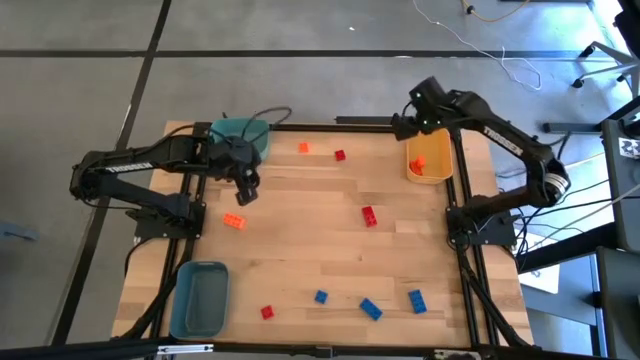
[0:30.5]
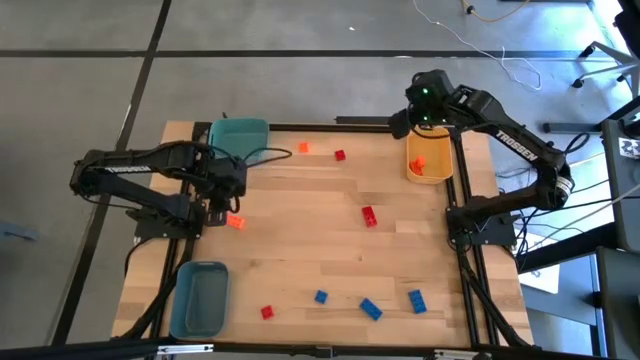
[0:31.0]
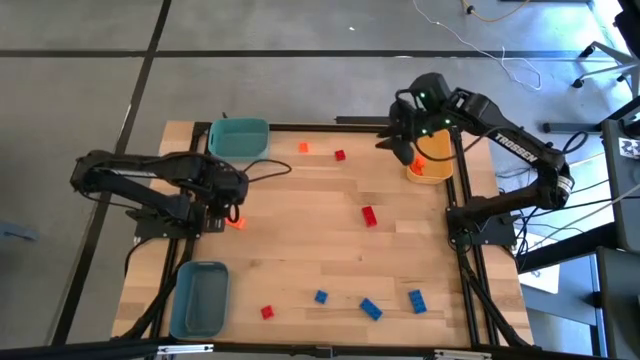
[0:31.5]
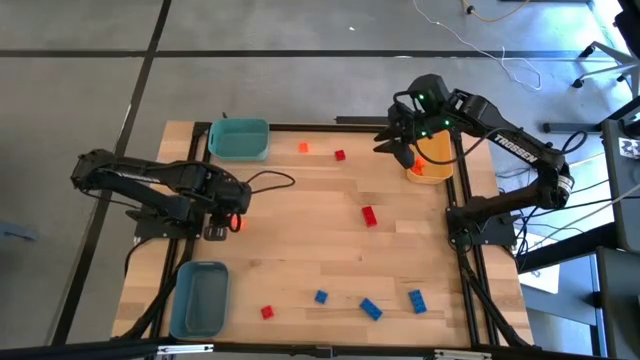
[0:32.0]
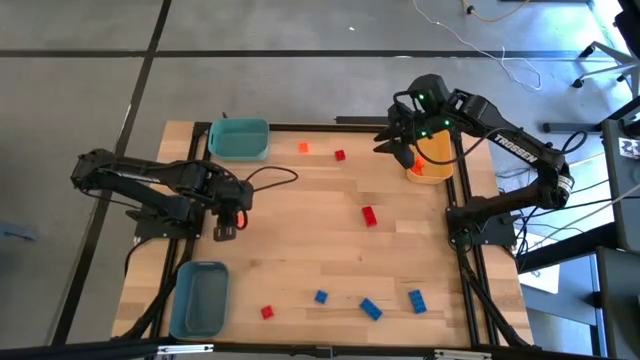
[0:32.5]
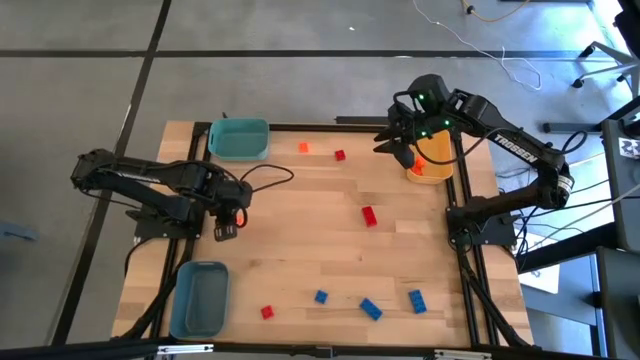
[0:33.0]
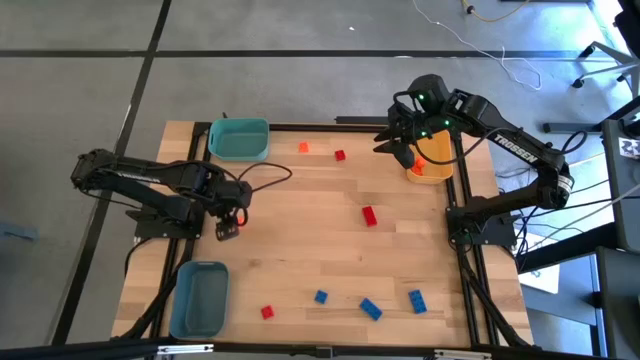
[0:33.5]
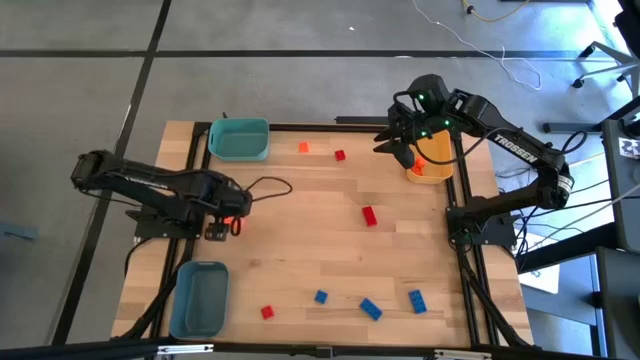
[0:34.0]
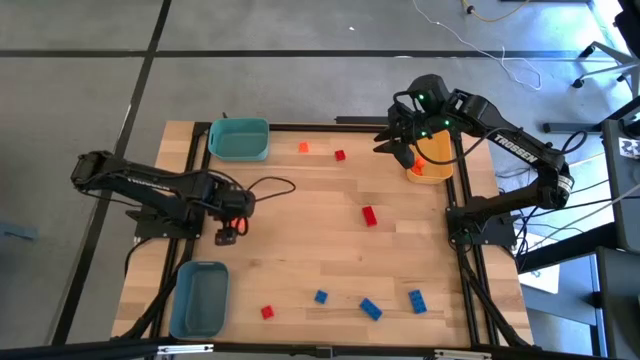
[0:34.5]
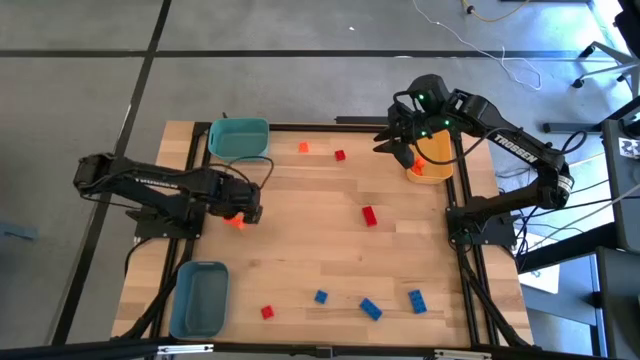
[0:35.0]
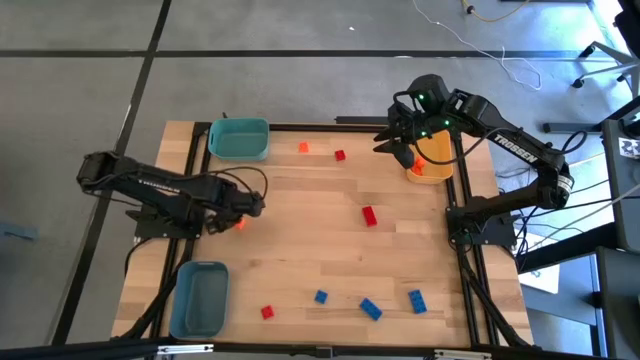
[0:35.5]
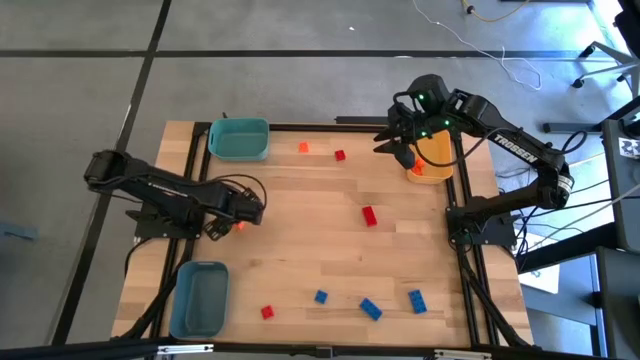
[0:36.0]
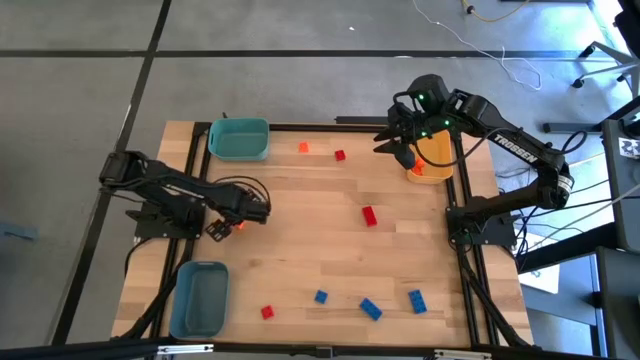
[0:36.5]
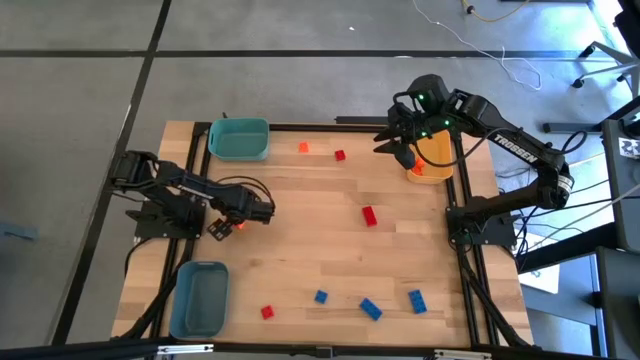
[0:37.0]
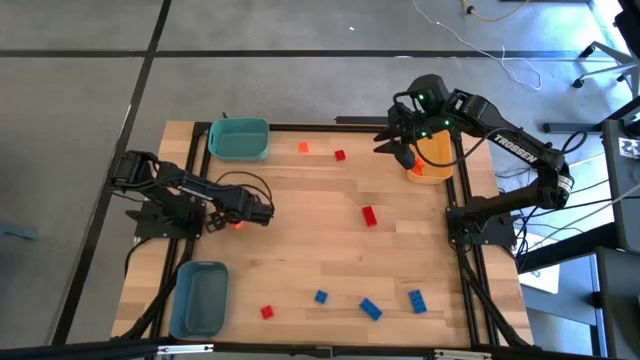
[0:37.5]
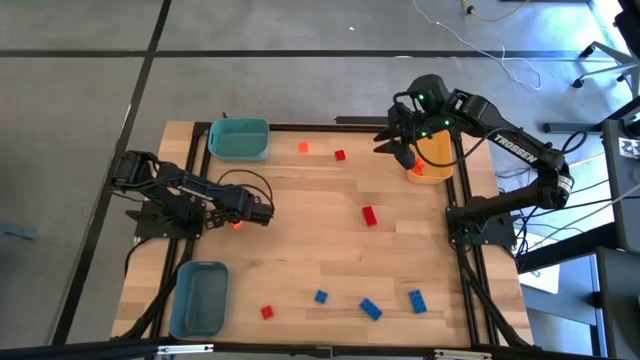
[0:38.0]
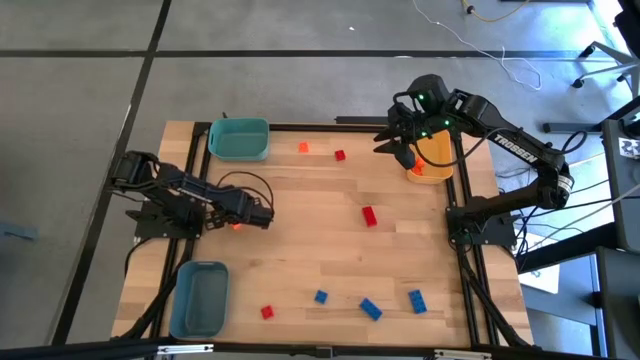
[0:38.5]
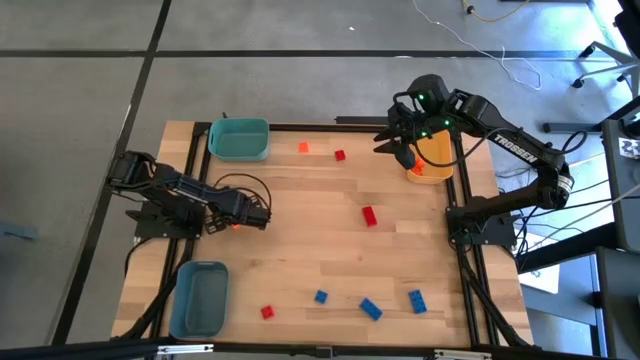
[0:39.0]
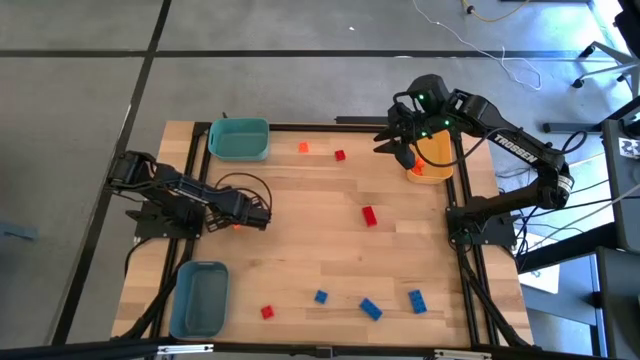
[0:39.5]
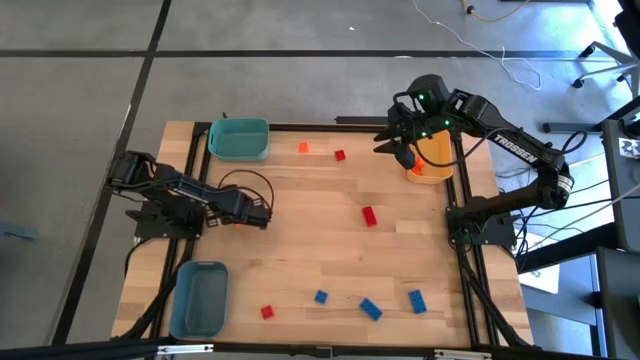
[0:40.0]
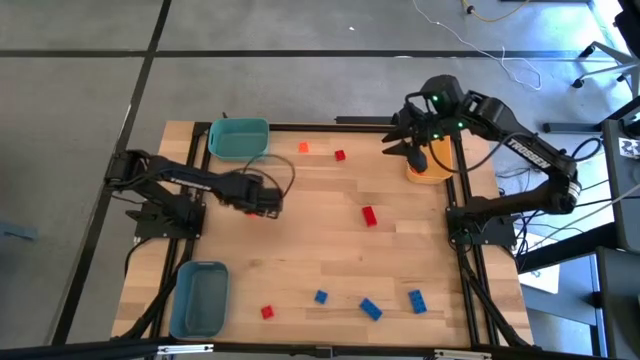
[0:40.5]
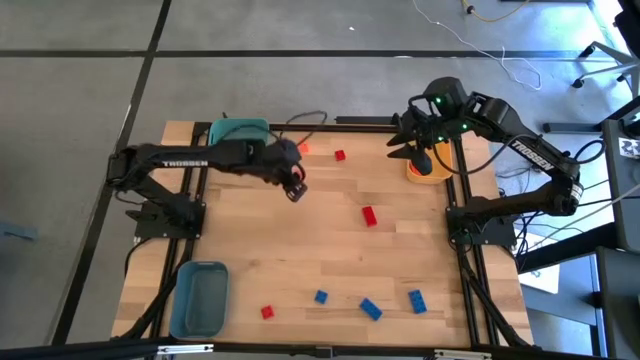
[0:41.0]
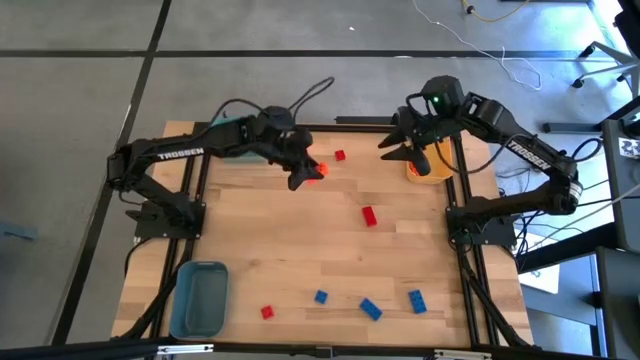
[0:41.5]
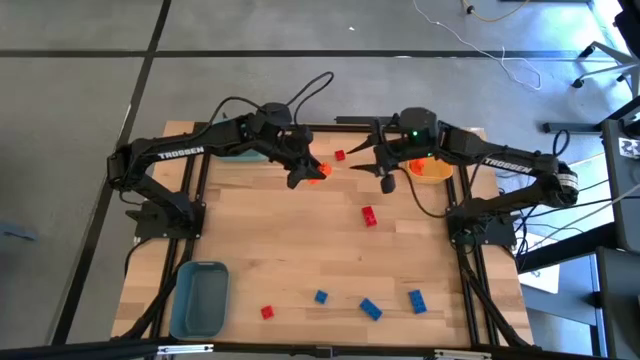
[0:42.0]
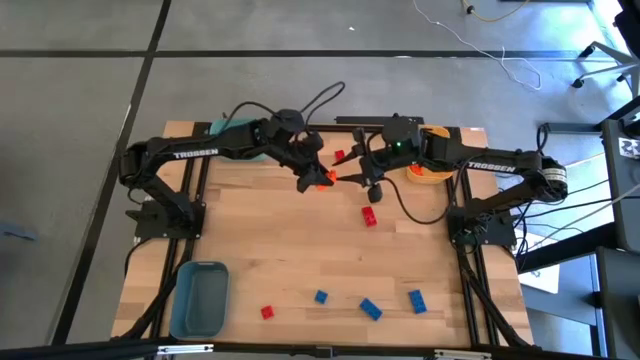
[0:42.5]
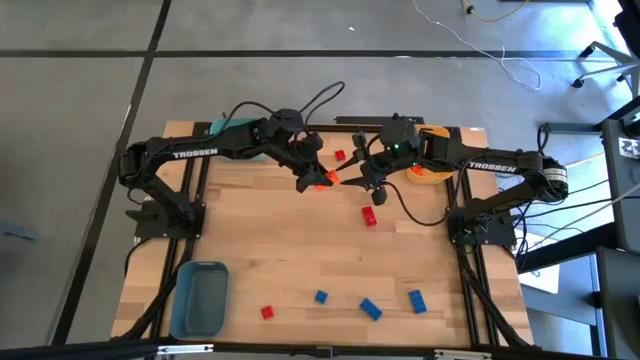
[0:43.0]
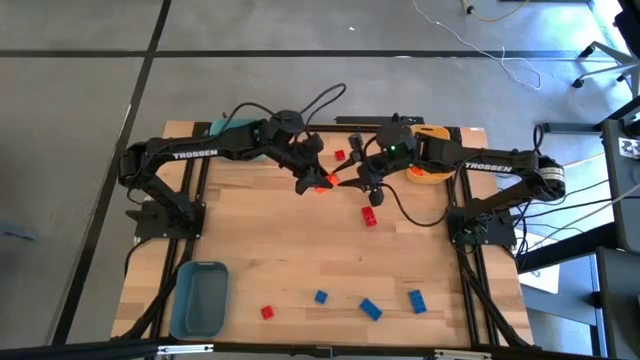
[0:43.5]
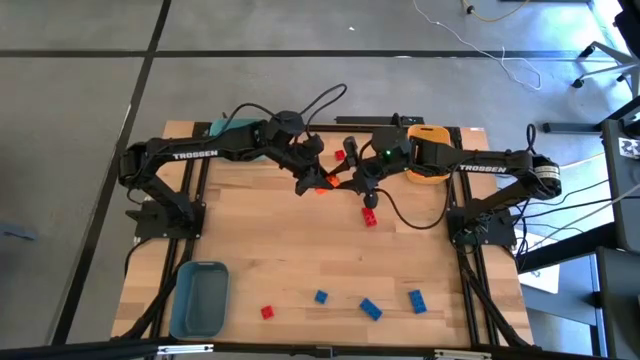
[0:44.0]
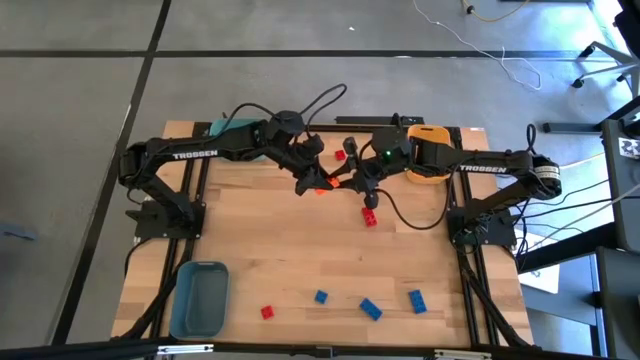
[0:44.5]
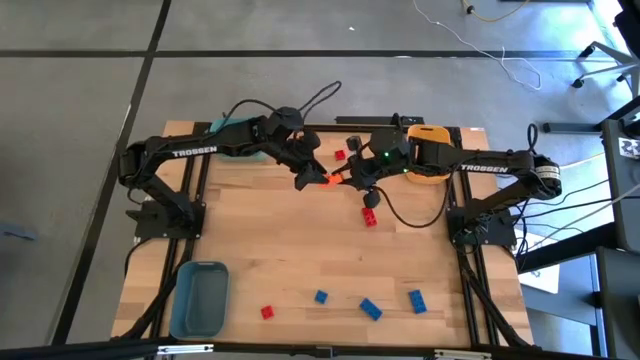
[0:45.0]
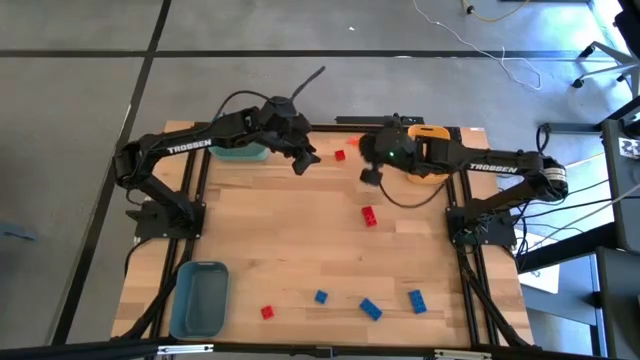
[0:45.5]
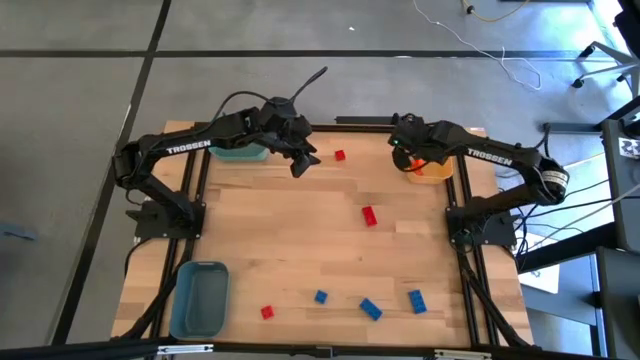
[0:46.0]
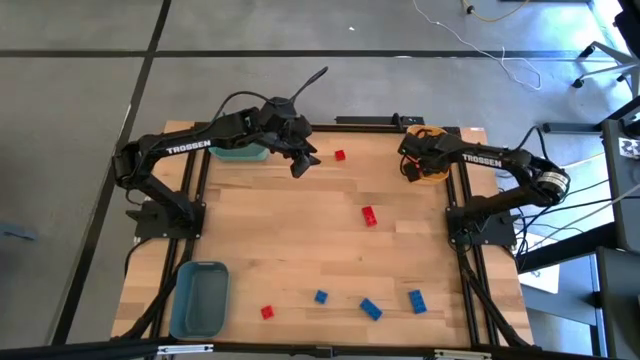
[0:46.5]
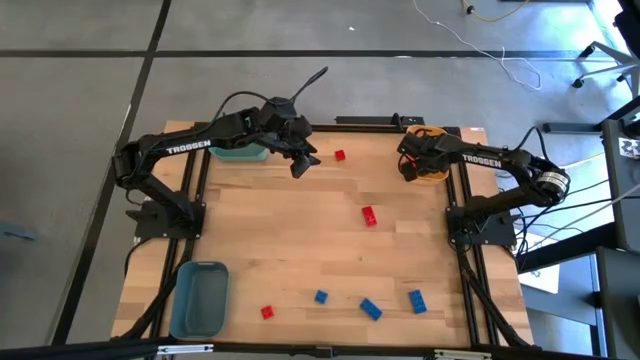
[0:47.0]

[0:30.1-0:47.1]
Task: Sort & place blocks by color
Put the orange game piece into the yellow bin

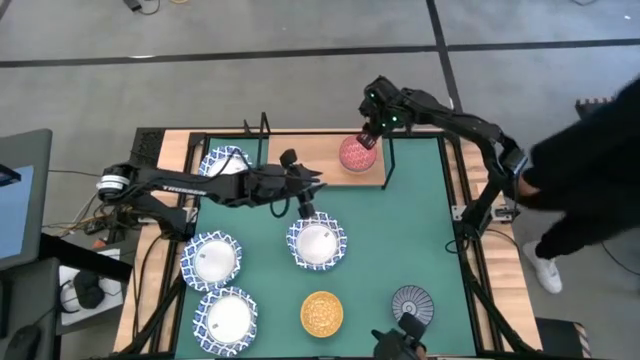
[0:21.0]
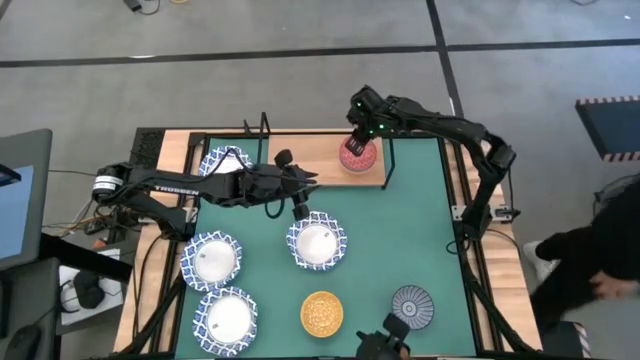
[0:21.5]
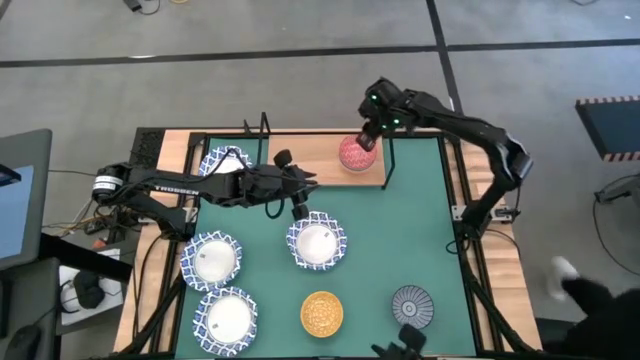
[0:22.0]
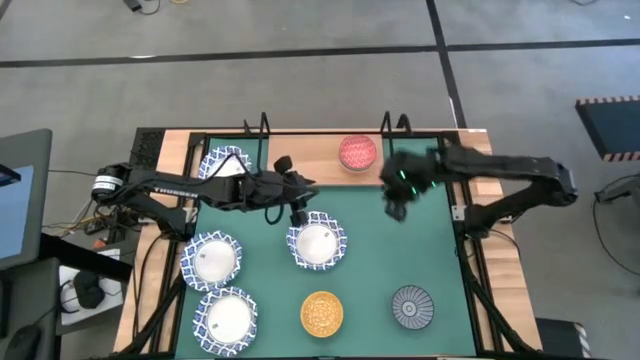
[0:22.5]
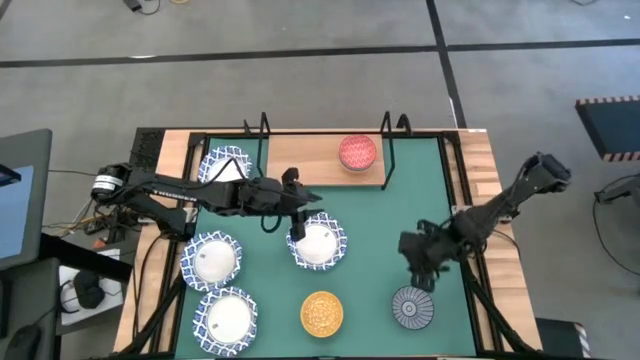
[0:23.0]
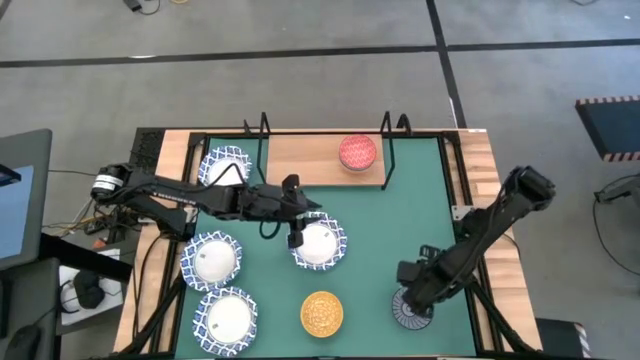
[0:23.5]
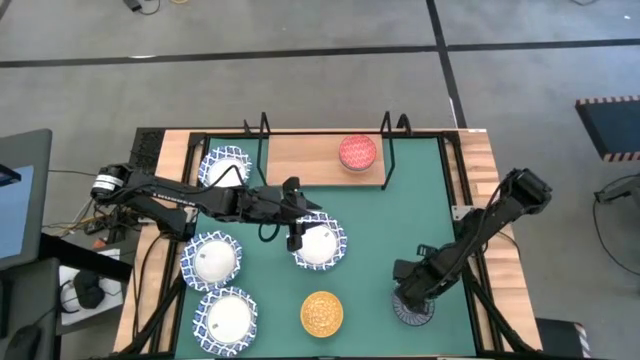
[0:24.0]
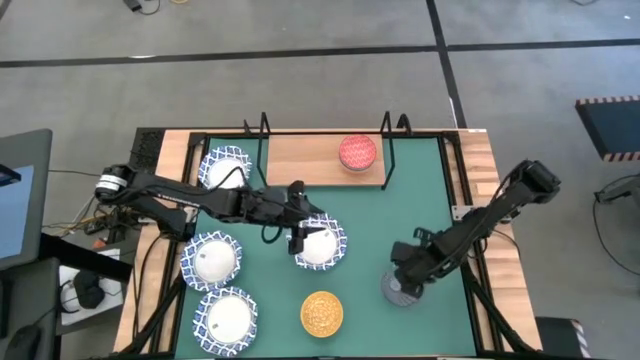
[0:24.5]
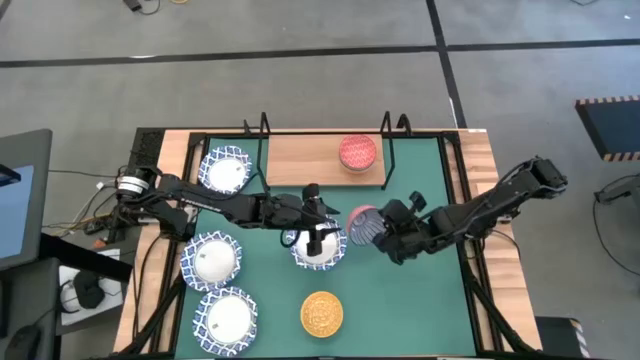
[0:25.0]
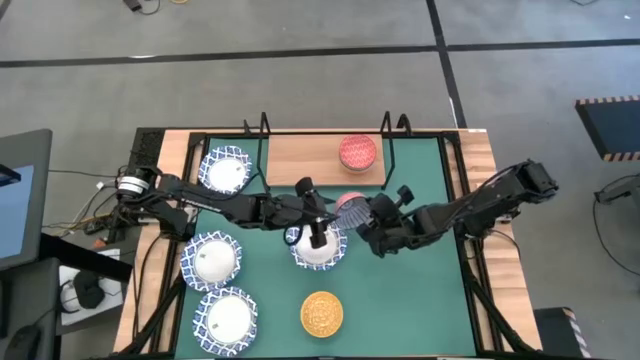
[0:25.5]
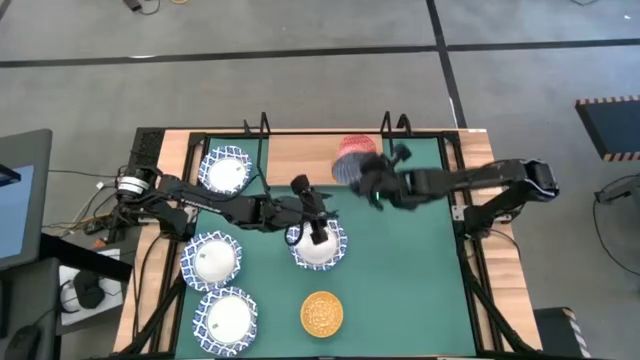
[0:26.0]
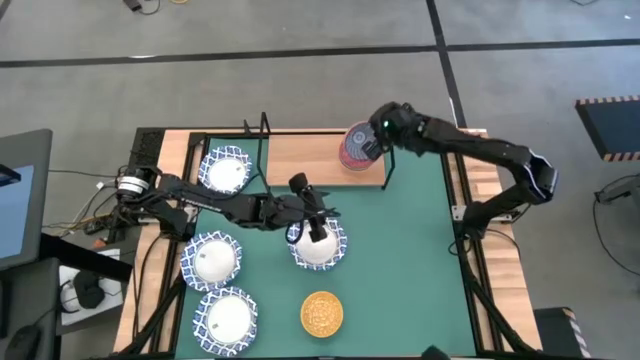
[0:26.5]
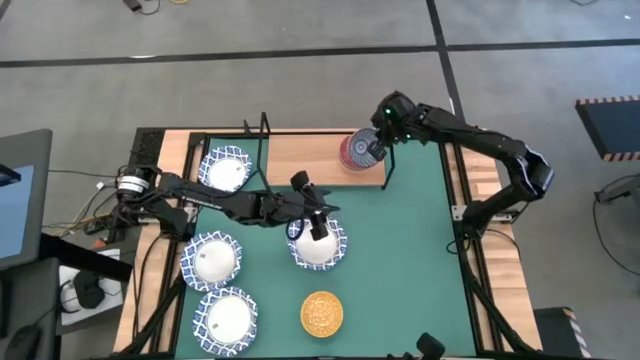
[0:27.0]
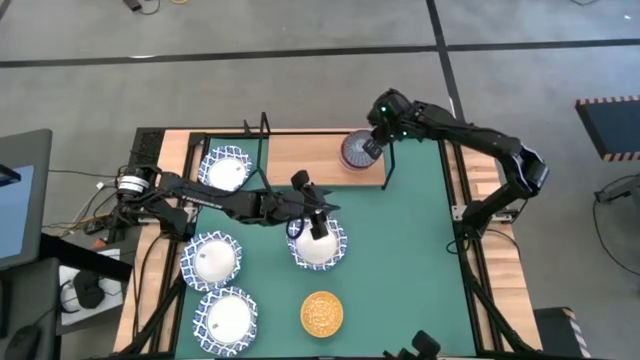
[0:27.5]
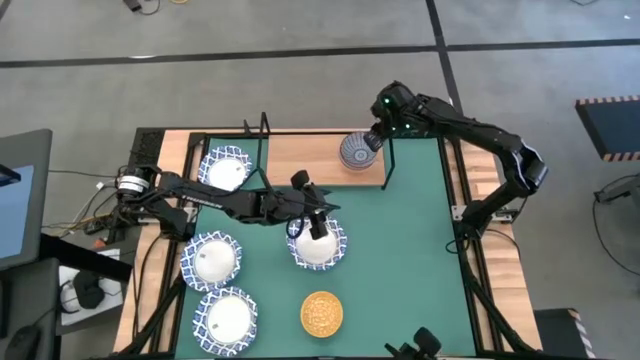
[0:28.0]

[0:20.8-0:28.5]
Task: Place and stack bowls onto a shelf
Stack the blue patterned bowl on top of the red patterned bowl
